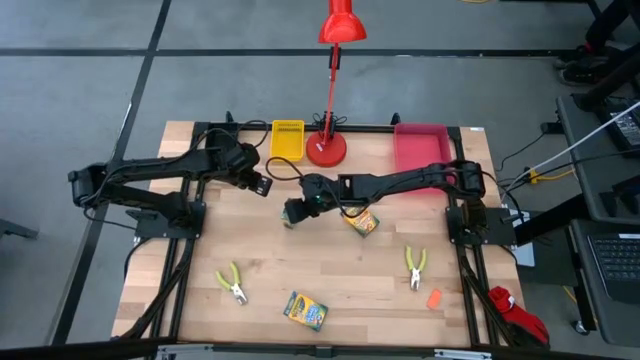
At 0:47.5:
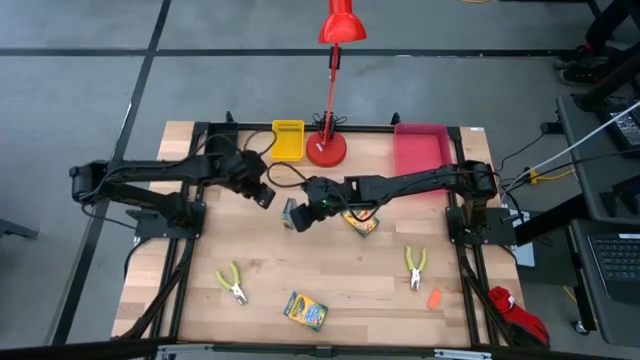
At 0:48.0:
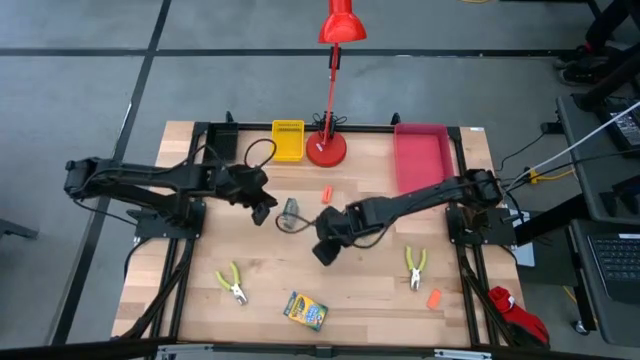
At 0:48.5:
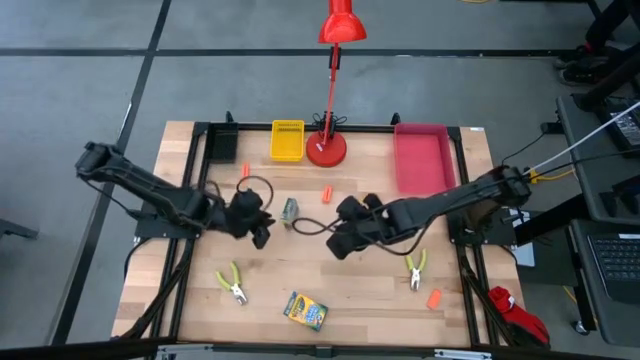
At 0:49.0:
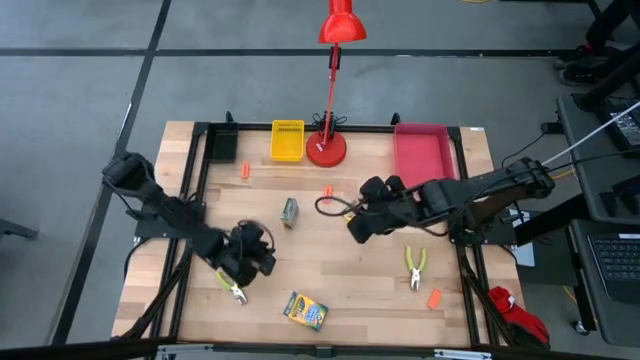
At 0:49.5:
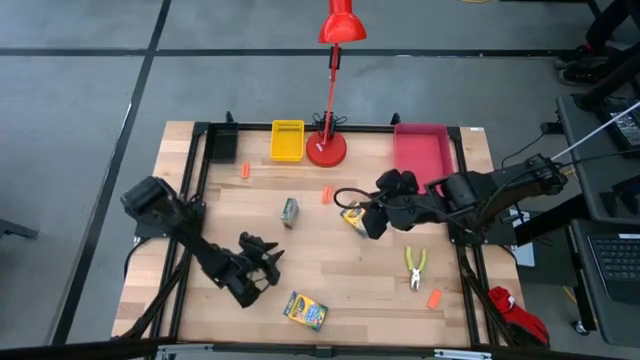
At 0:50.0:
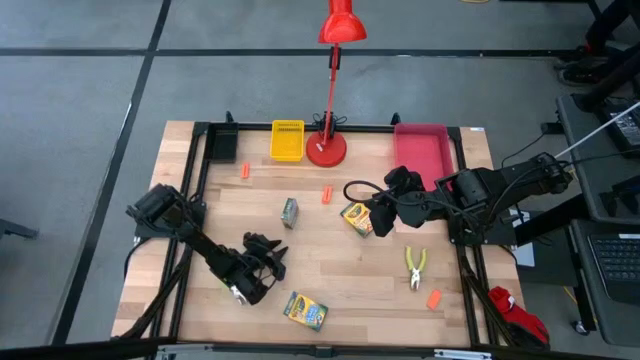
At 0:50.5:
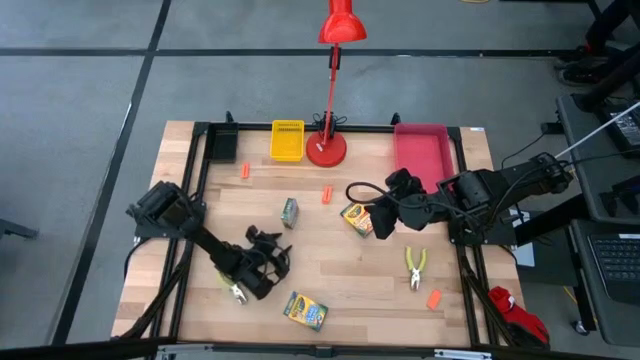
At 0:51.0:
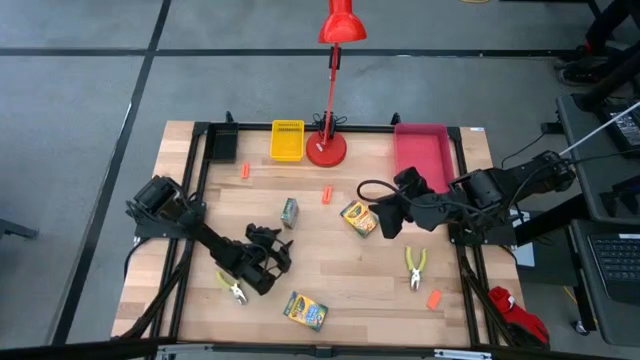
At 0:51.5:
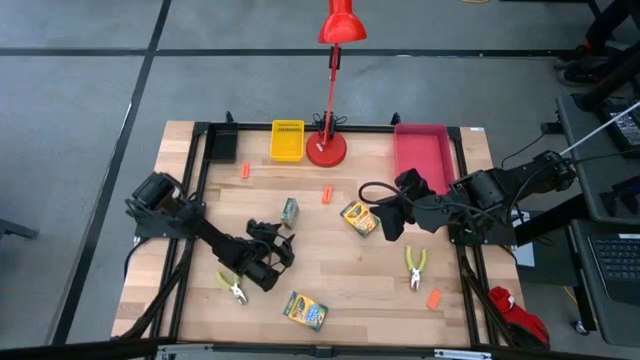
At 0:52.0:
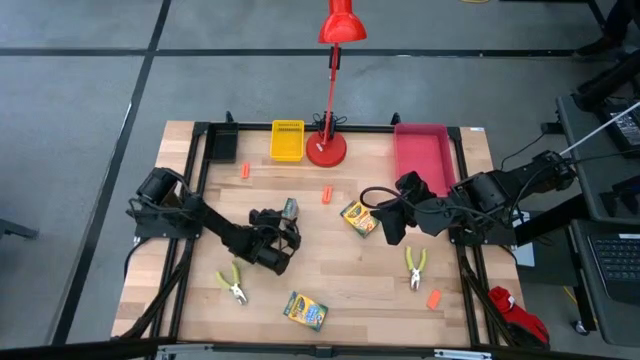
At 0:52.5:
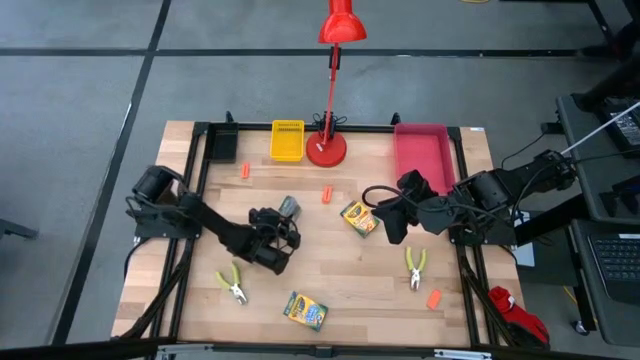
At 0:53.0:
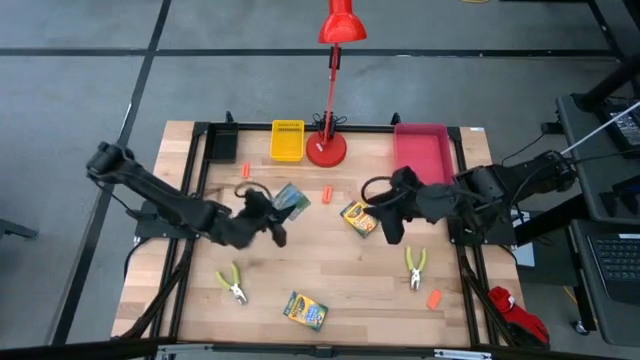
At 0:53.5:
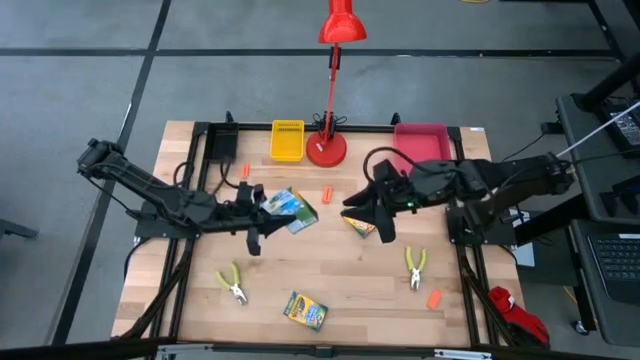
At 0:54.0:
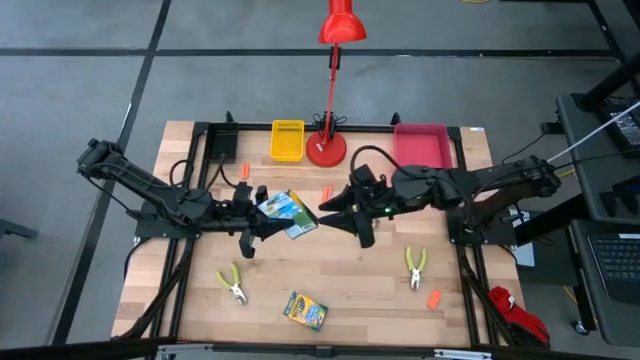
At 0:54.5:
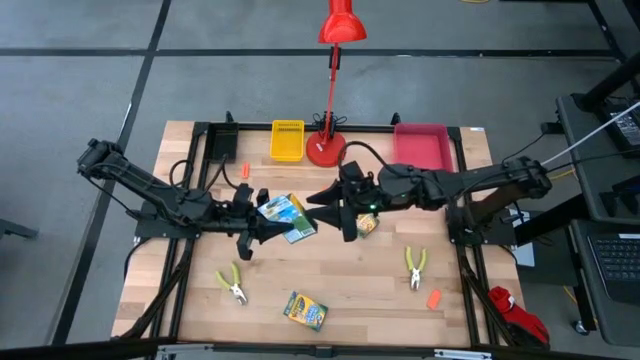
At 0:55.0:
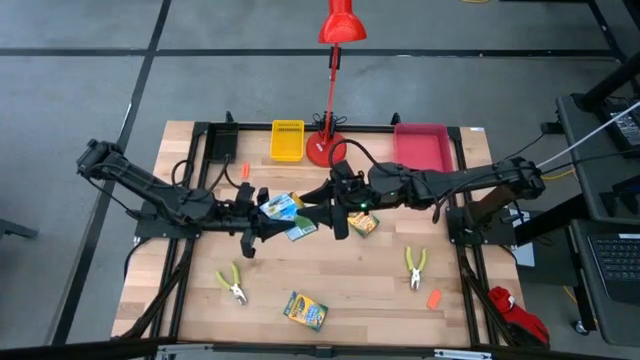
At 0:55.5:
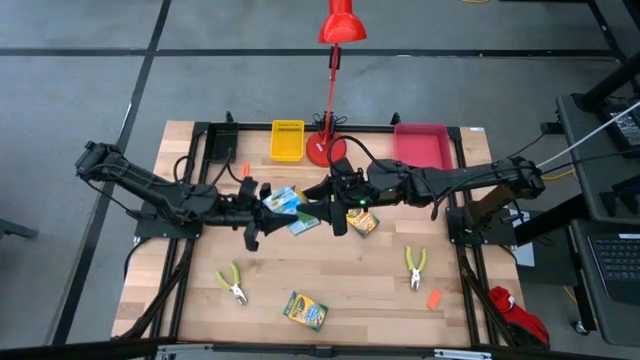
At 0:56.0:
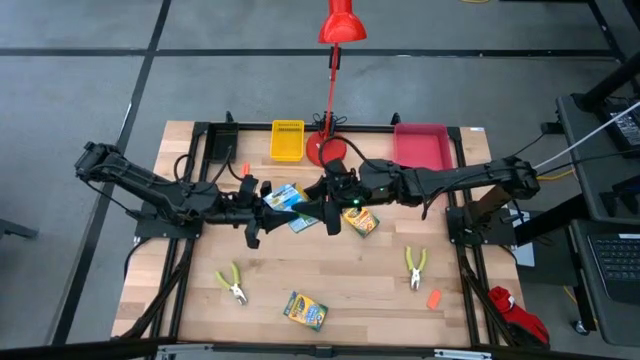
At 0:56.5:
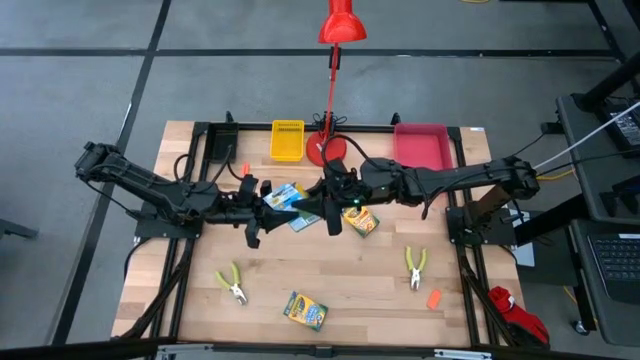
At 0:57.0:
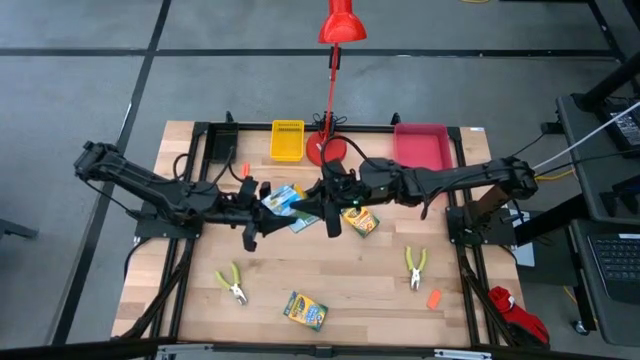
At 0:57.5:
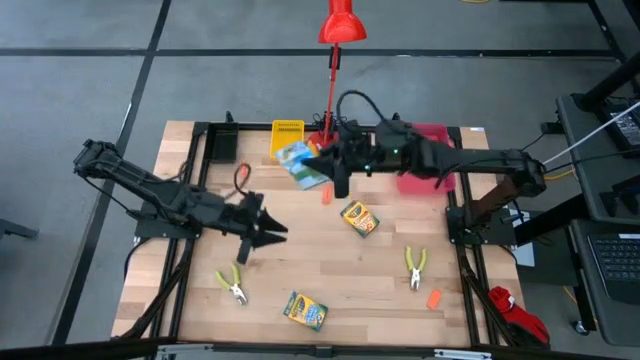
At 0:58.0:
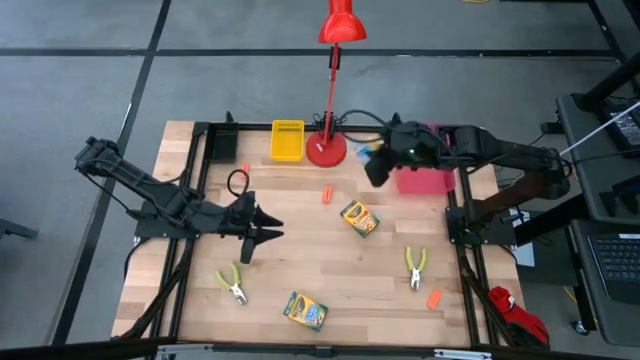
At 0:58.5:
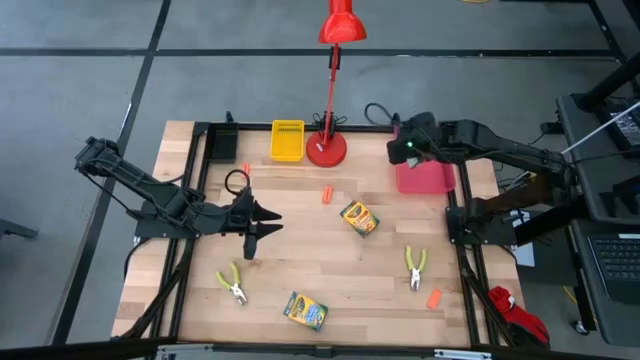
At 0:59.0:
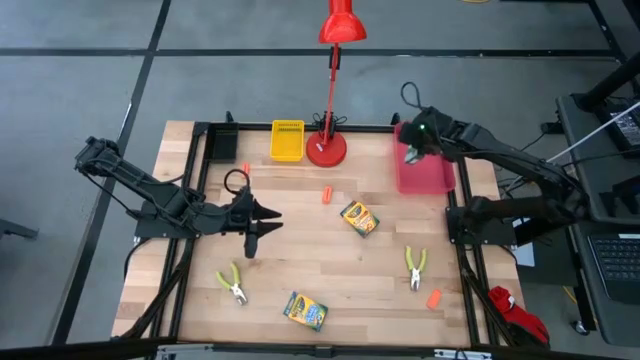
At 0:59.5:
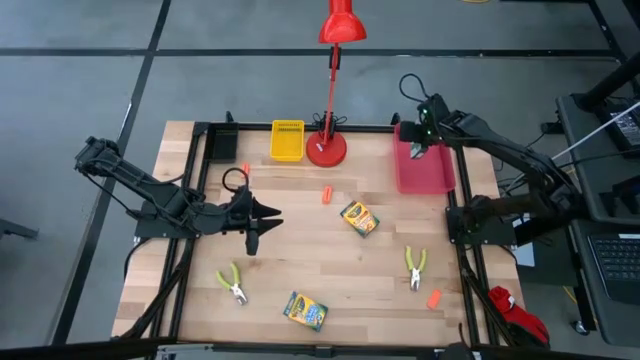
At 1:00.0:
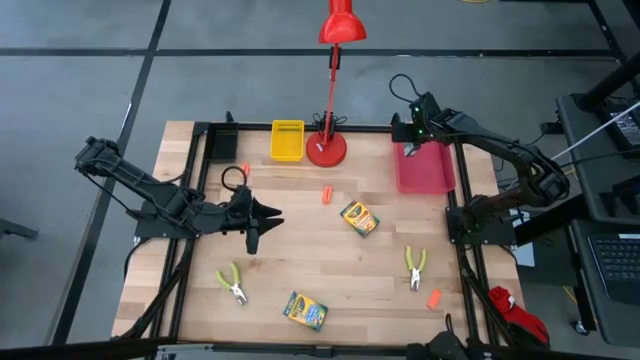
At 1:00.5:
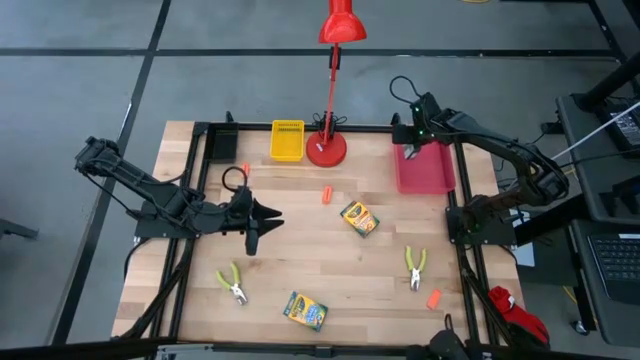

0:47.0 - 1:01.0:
Task: Pick & Place School Supplies
Put the yellow crayon box into the red bin

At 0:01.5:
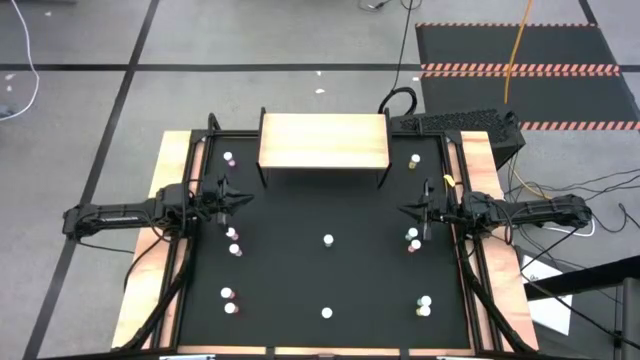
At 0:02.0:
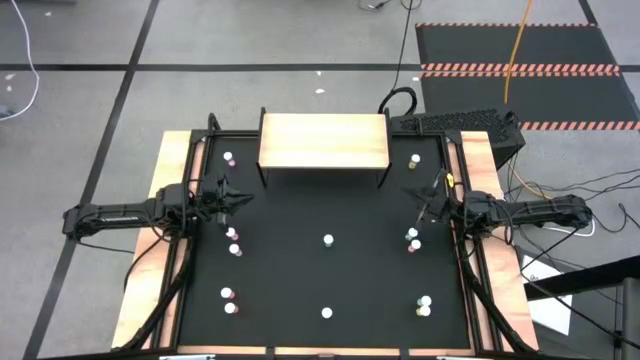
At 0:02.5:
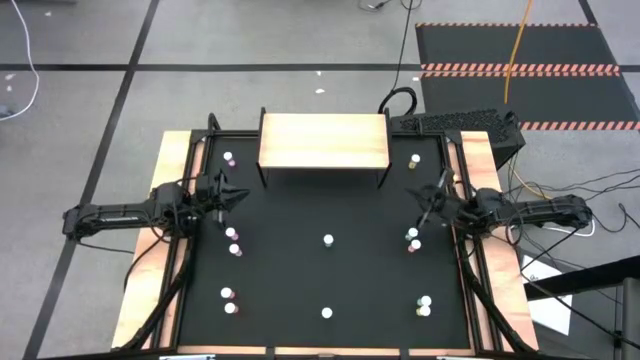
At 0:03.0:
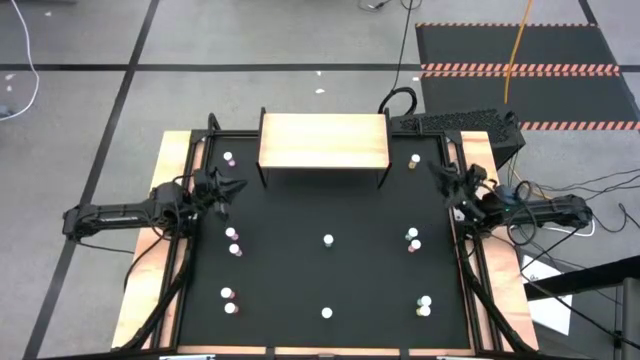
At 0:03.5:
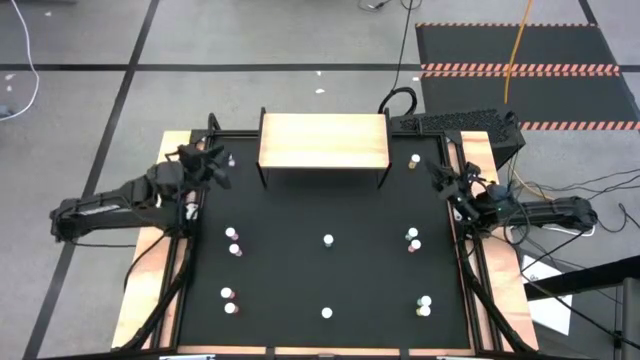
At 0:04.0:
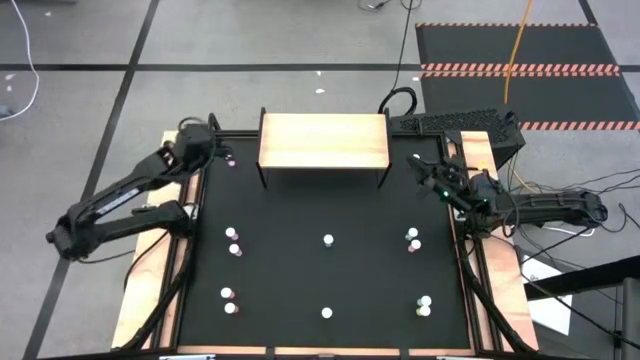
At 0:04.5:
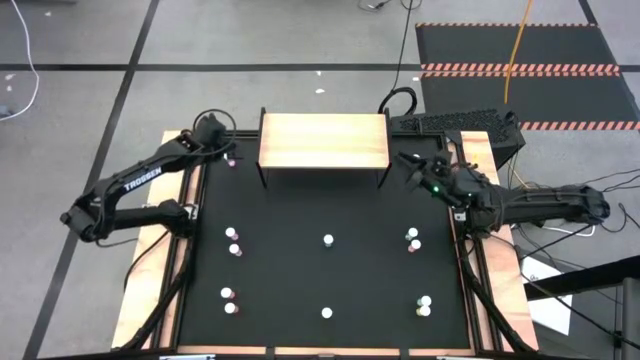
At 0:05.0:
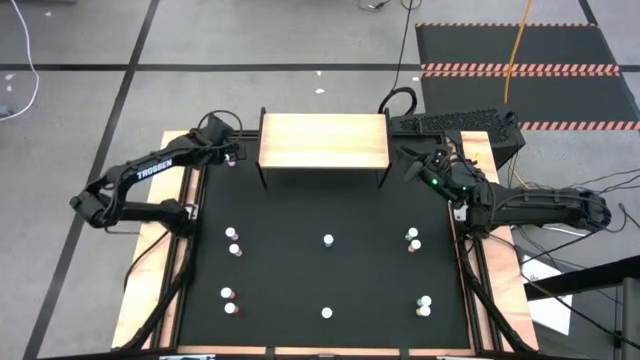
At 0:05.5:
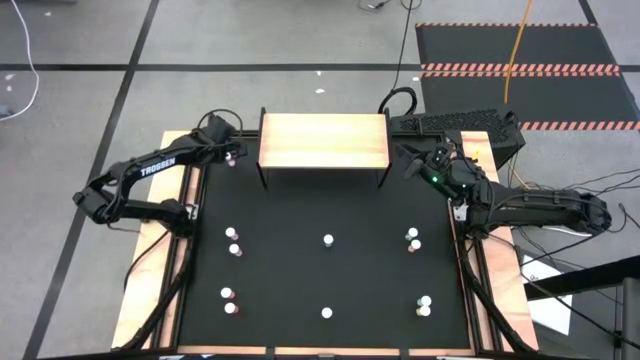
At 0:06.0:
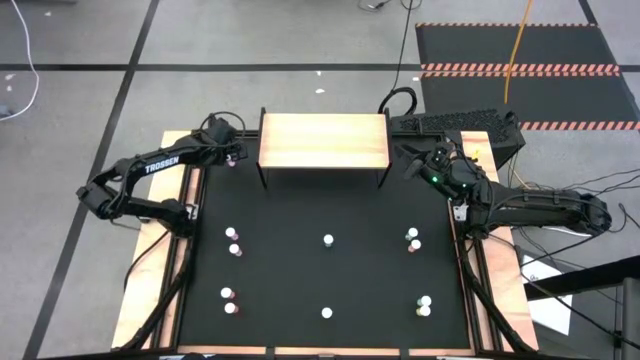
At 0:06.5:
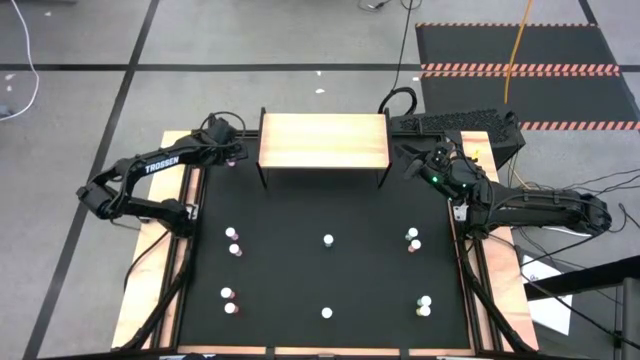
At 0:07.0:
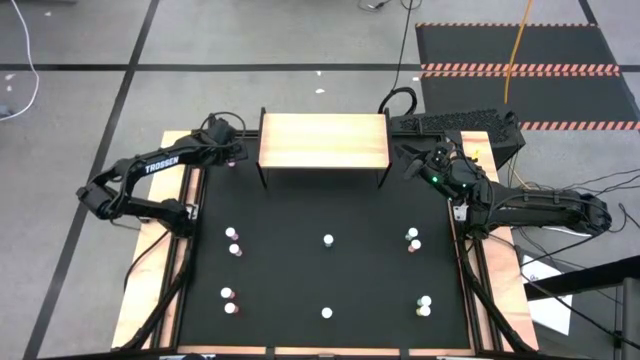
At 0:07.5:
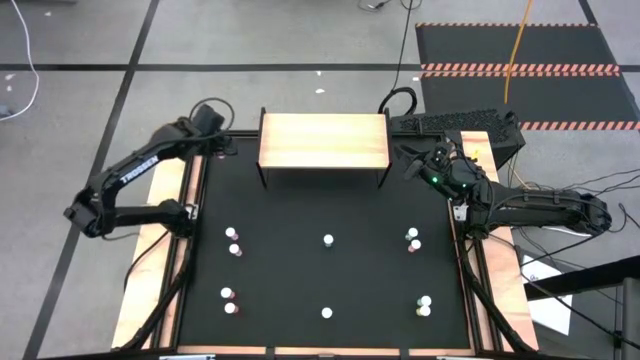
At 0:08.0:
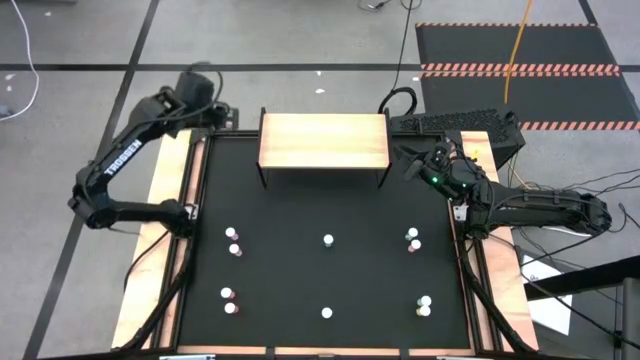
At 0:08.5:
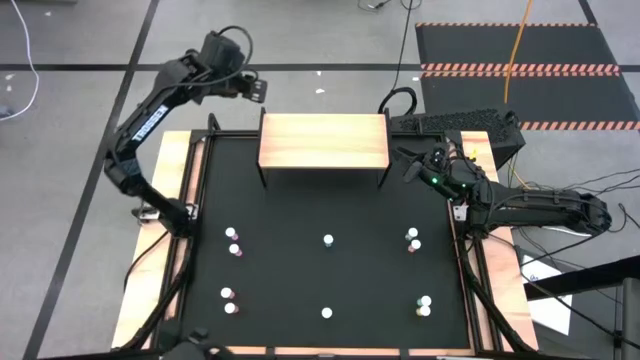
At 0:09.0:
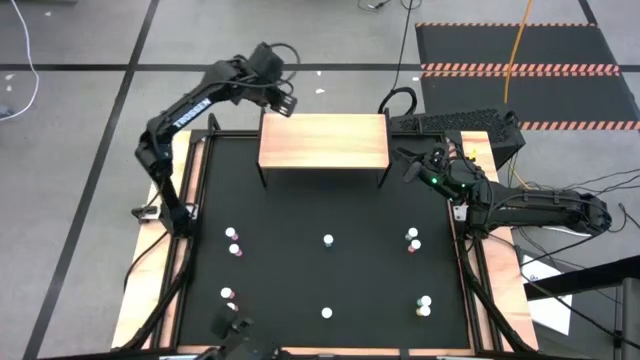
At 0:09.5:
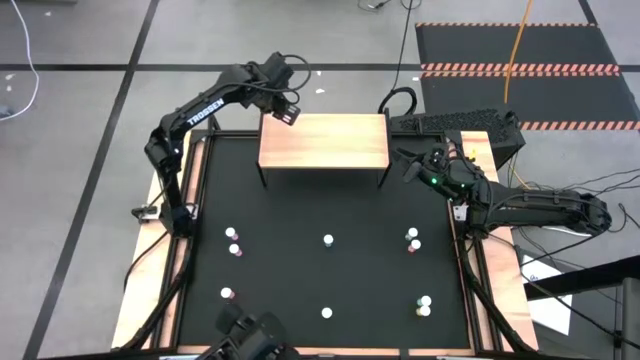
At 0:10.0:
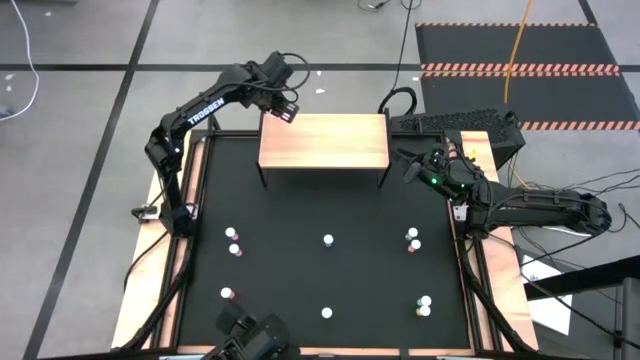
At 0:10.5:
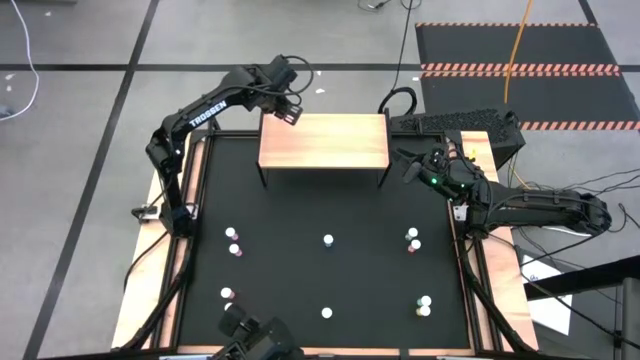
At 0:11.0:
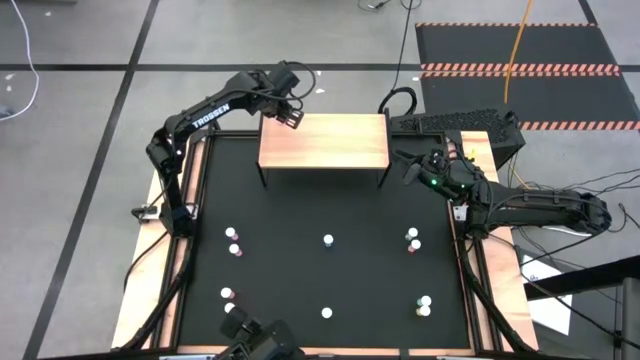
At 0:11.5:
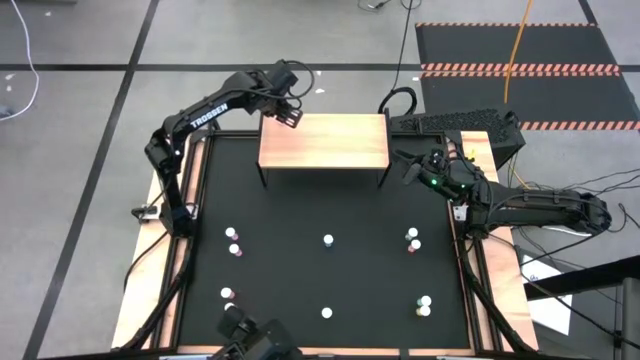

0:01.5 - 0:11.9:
Task: Pick and place medicine bottles onto shelf by color
Put the top violet pill bottle on the shelf
